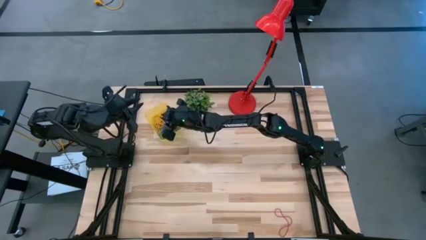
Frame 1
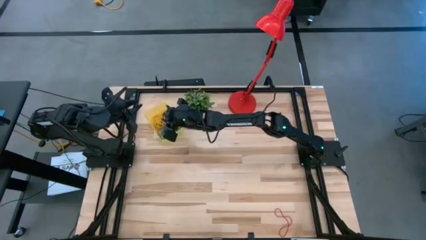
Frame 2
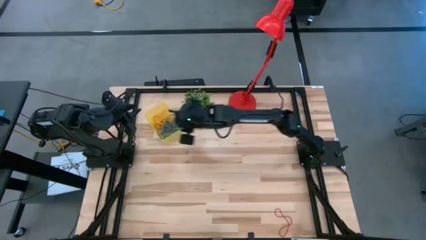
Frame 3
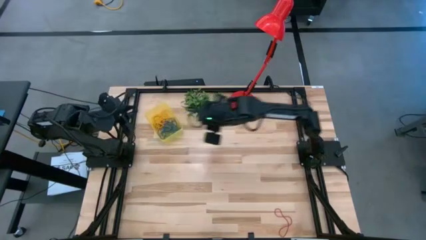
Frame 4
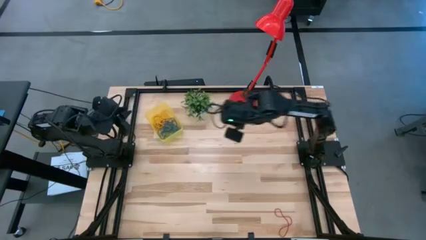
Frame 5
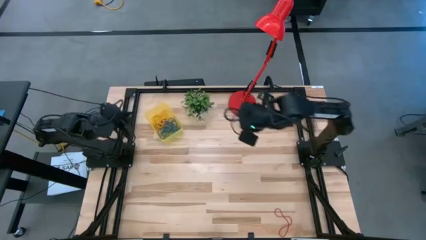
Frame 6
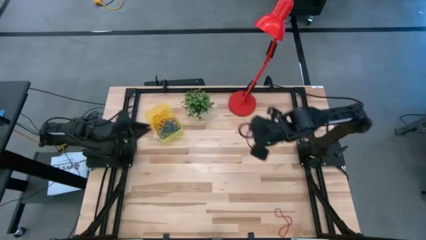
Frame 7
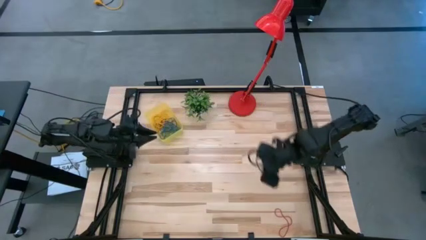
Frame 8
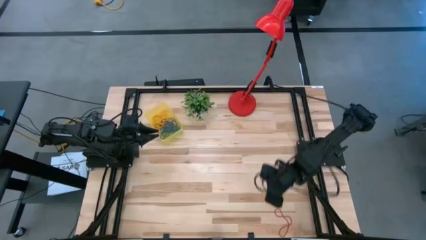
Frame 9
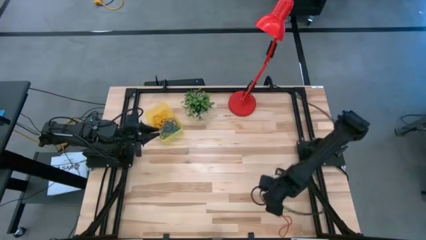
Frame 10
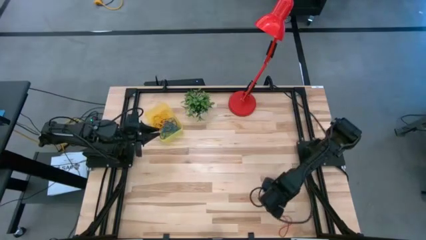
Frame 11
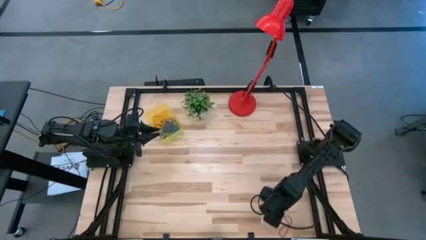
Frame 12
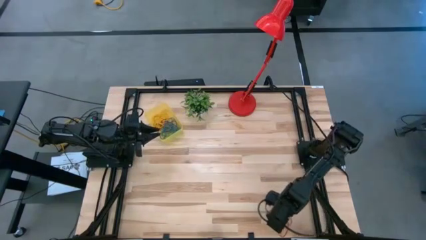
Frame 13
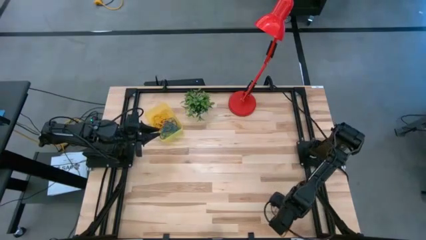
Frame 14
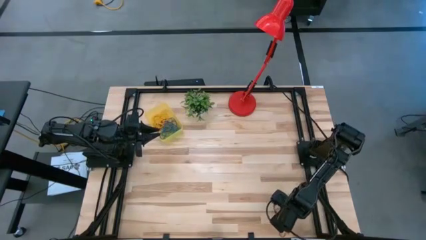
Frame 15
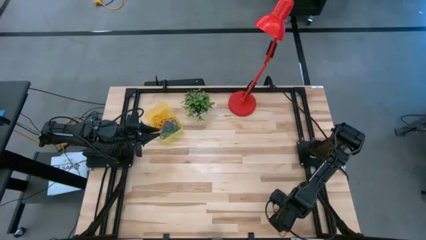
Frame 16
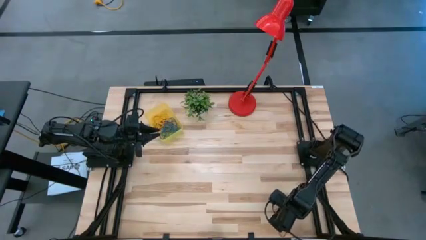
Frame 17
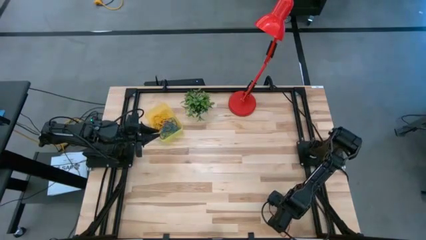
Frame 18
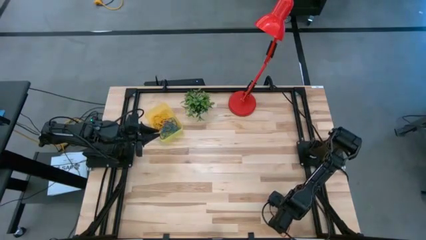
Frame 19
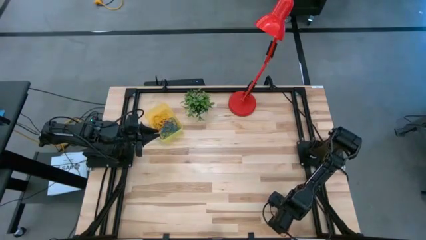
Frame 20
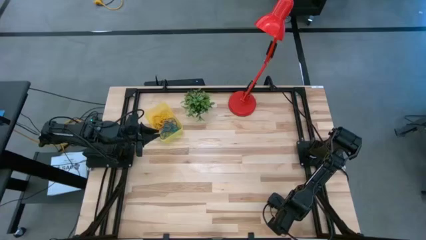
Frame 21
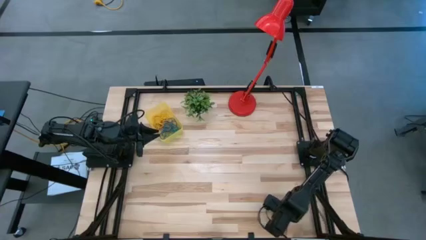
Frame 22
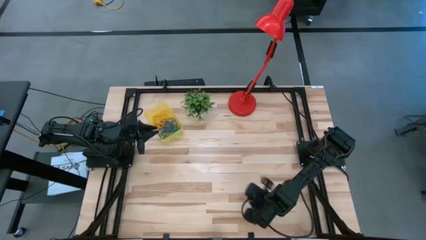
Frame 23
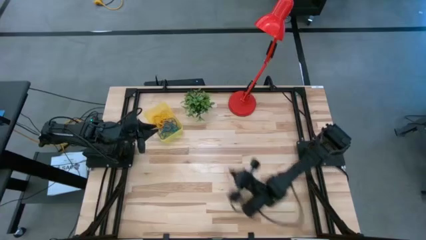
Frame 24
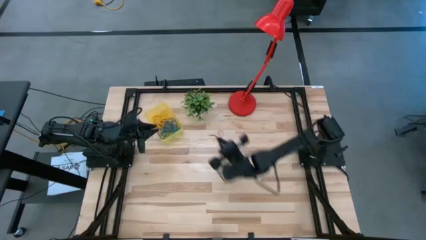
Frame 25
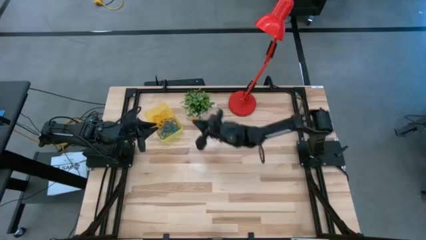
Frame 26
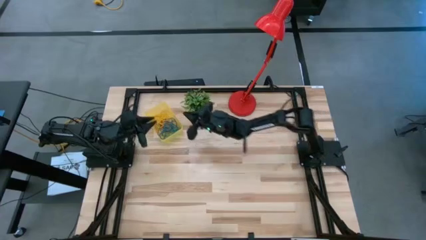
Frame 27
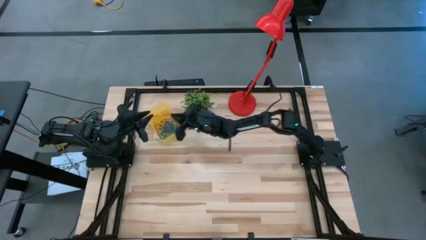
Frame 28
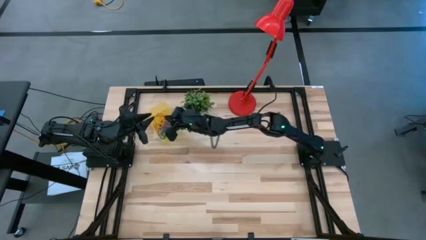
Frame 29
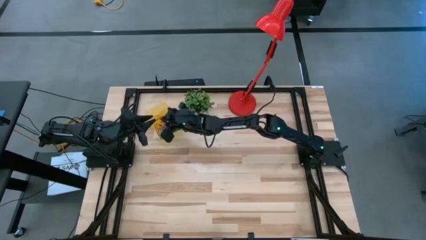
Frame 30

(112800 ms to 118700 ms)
Task: Pick and place items into bin
Put the red rubber band into the yellow bin

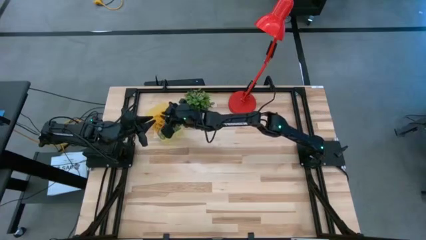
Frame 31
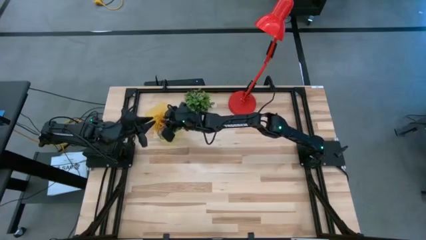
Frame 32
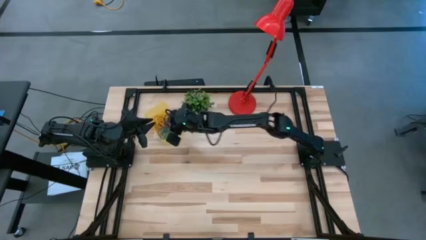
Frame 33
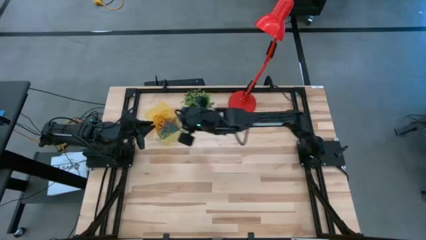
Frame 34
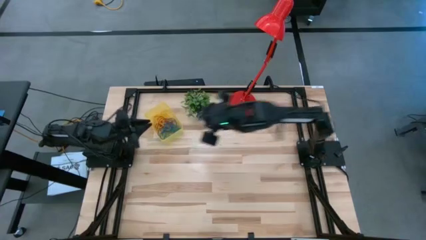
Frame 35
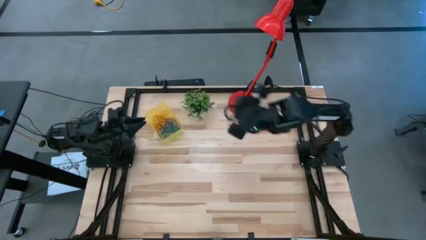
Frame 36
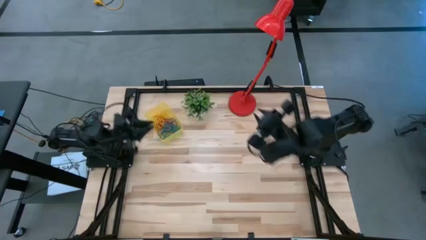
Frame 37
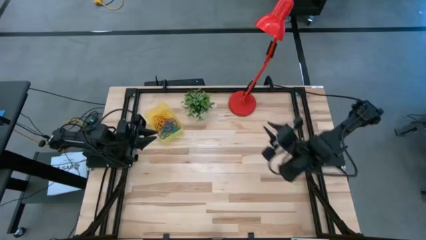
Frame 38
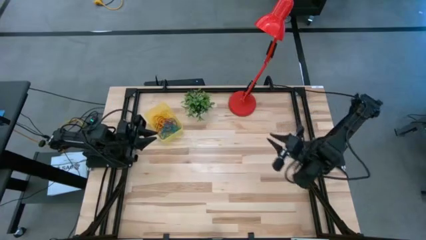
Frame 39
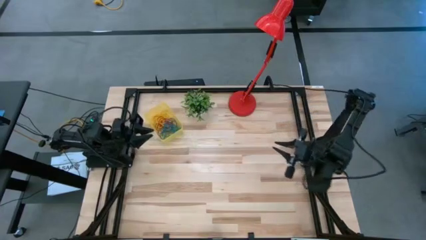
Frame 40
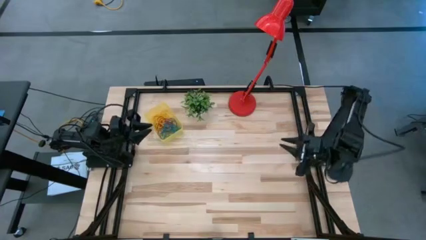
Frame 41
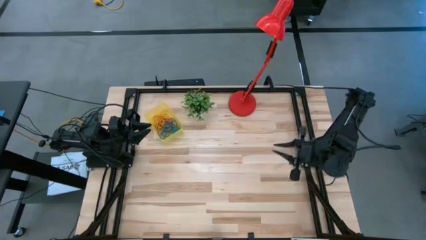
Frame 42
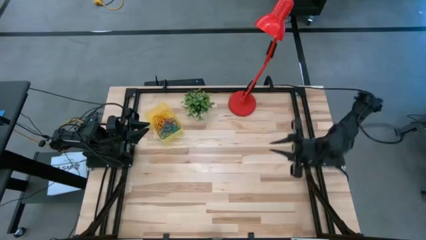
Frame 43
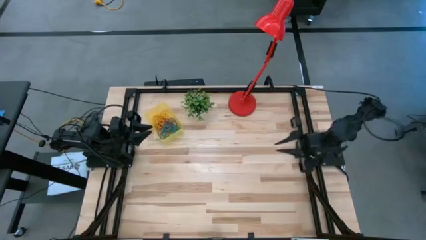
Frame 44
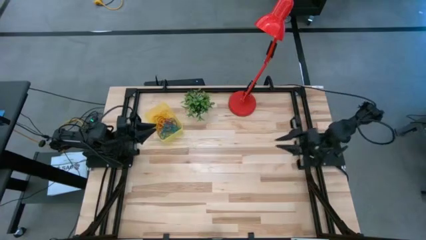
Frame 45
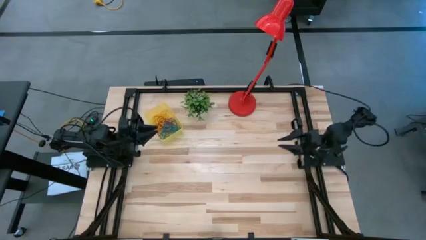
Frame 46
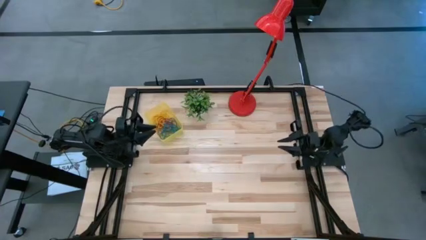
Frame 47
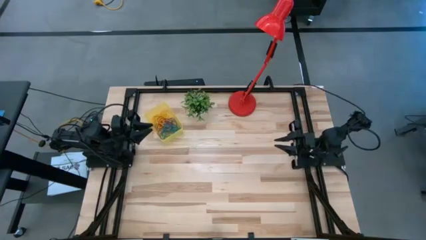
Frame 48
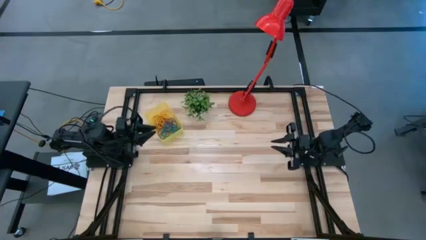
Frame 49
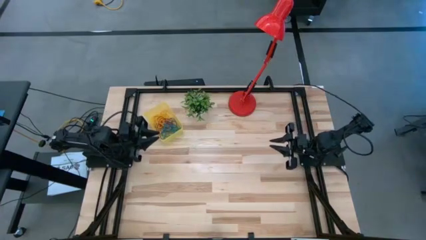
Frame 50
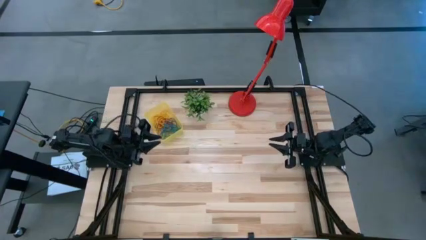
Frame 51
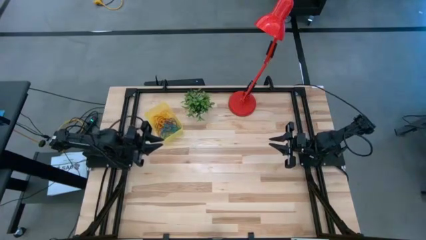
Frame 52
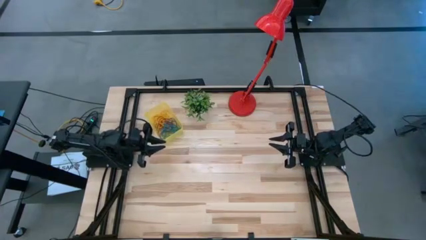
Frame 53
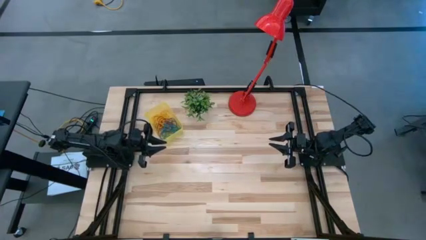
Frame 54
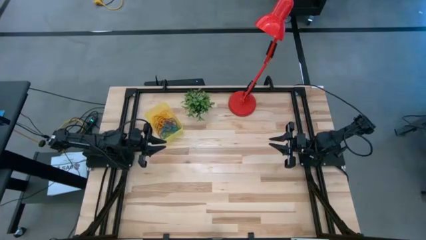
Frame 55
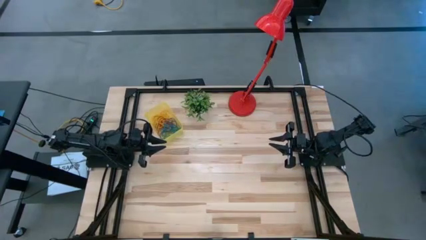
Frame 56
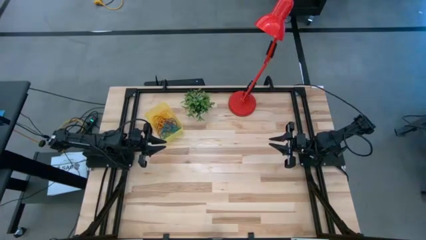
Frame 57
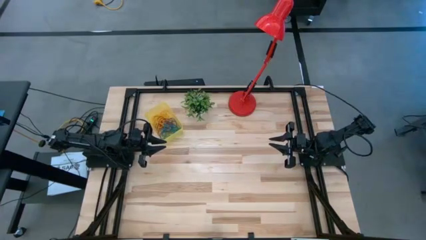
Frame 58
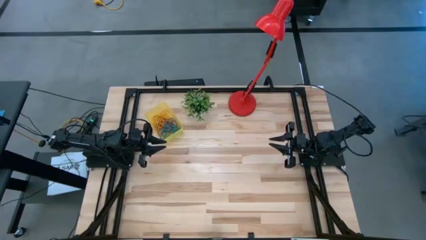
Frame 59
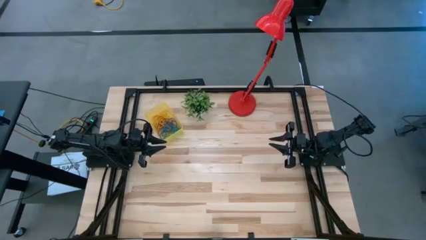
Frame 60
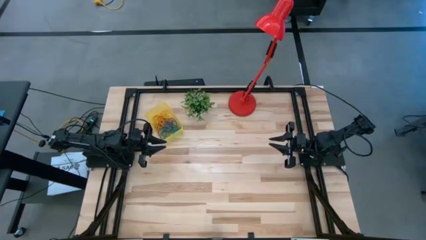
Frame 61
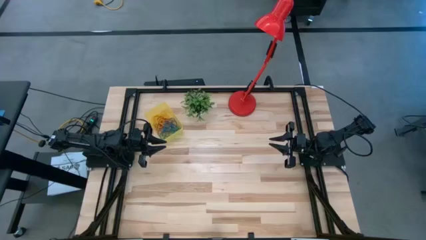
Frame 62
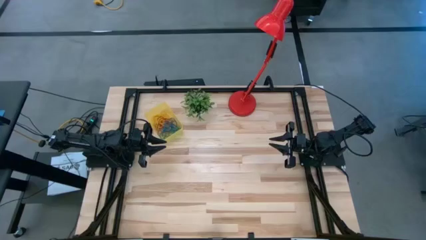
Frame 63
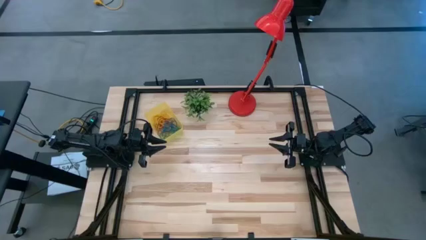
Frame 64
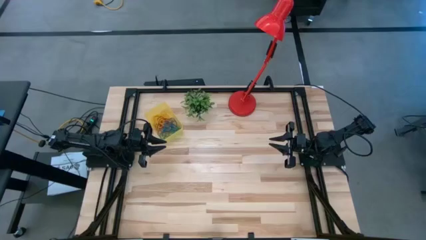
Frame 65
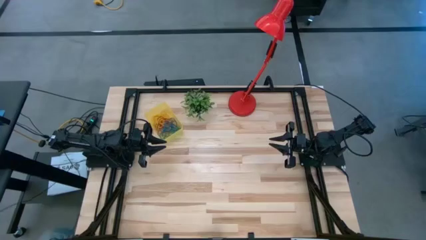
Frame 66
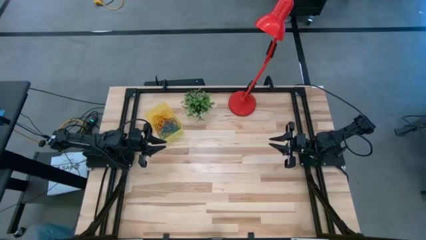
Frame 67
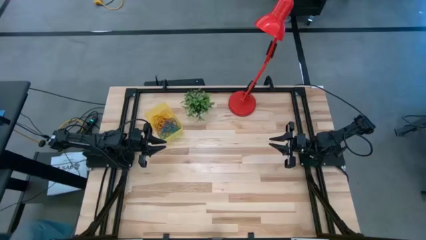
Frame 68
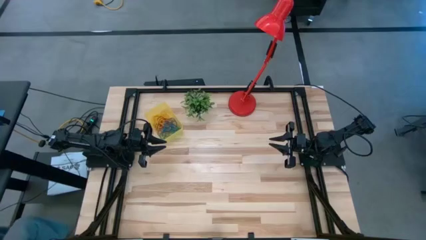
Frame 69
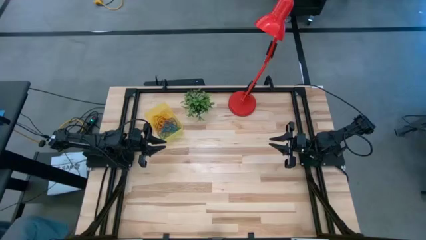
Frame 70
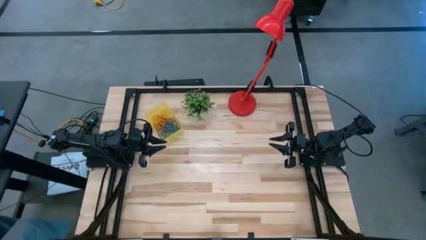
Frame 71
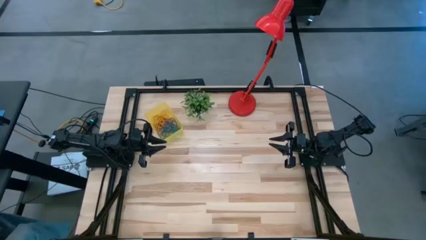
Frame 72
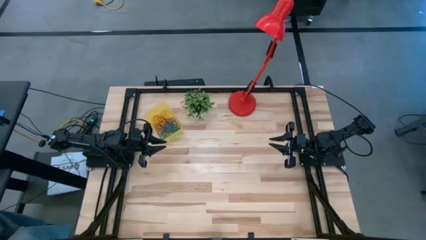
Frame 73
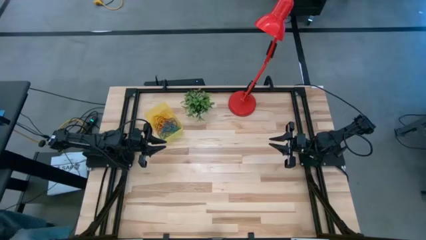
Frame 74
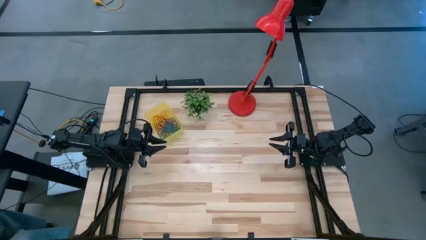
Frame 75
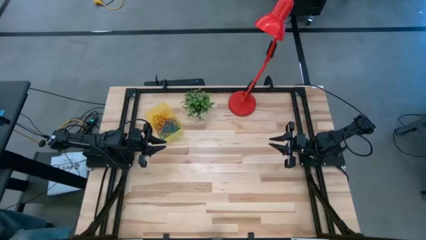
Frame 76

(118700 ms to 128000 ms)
Return to Home Position
